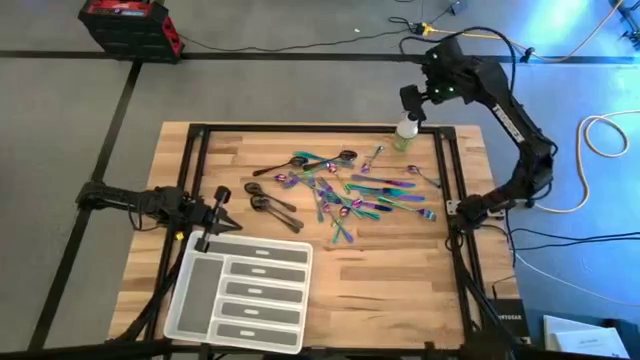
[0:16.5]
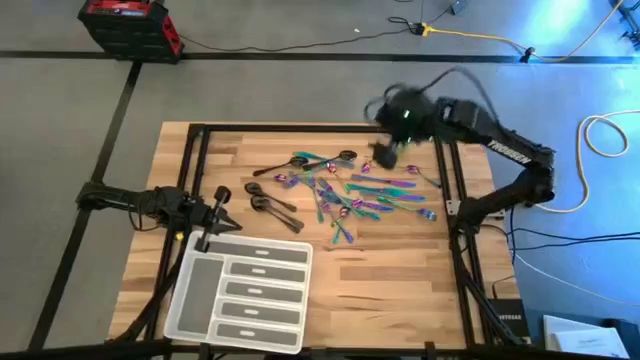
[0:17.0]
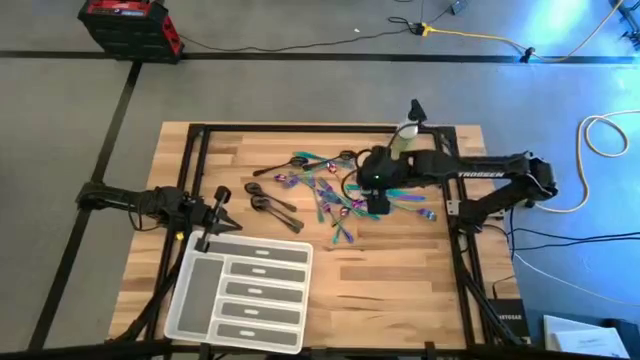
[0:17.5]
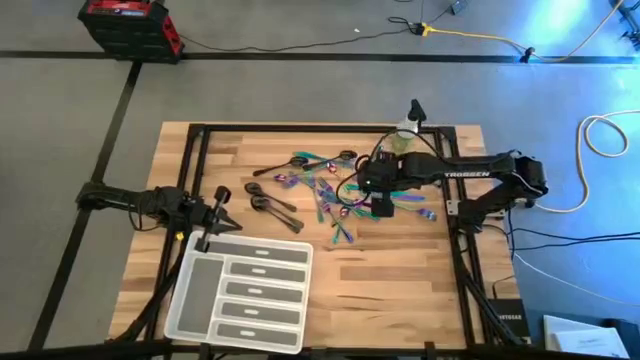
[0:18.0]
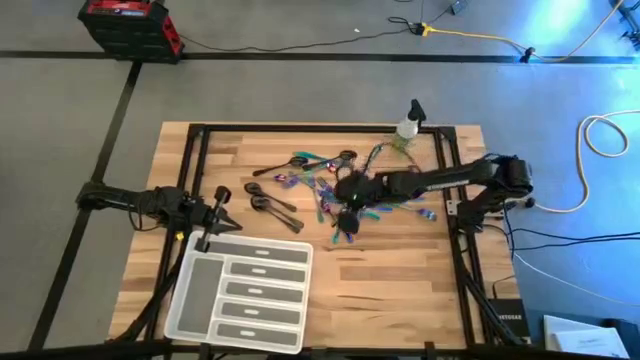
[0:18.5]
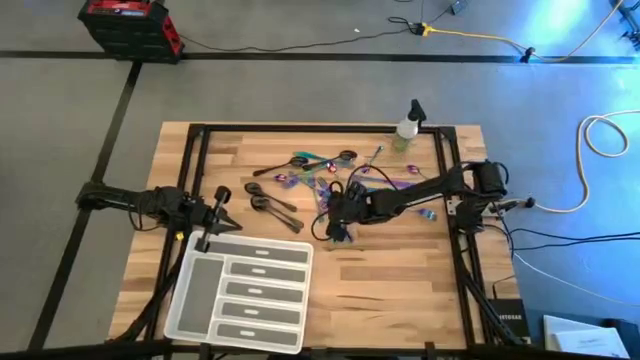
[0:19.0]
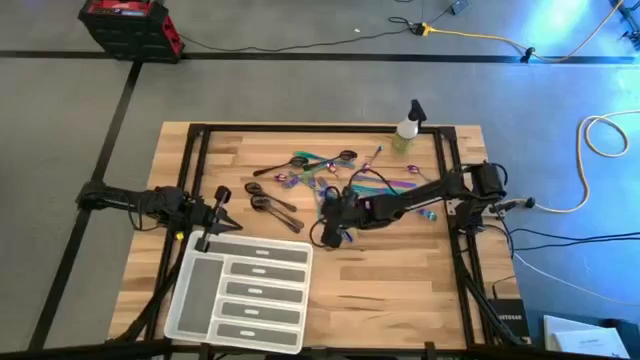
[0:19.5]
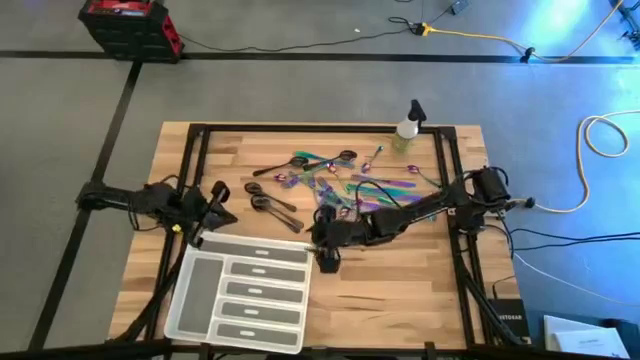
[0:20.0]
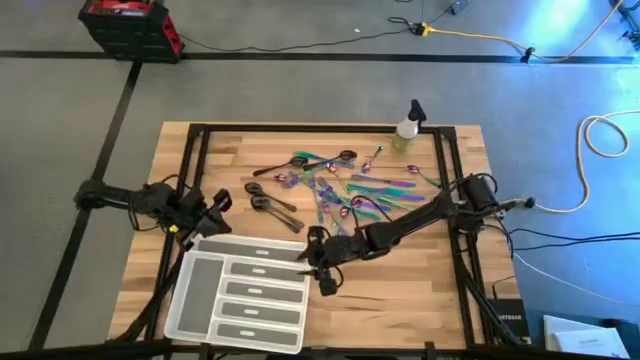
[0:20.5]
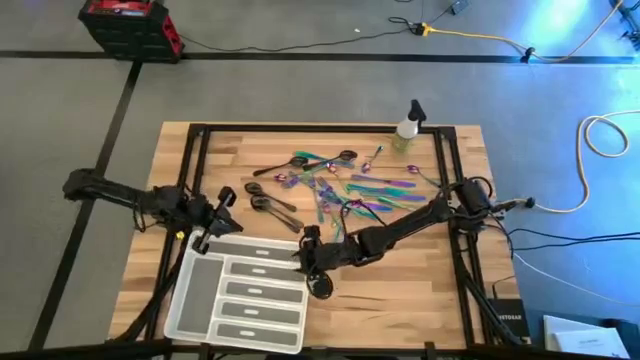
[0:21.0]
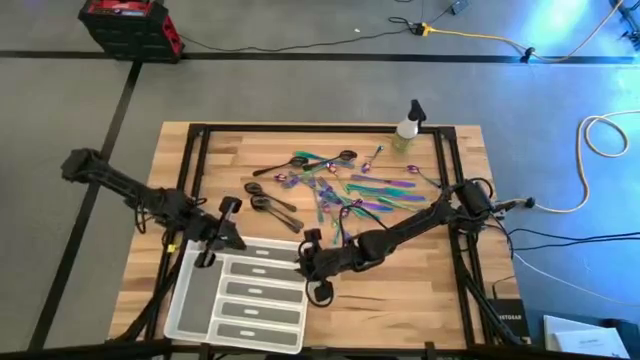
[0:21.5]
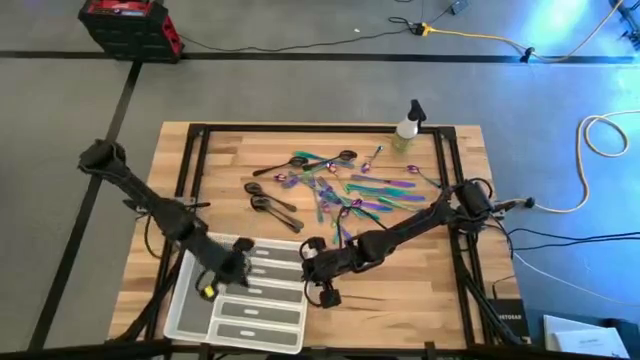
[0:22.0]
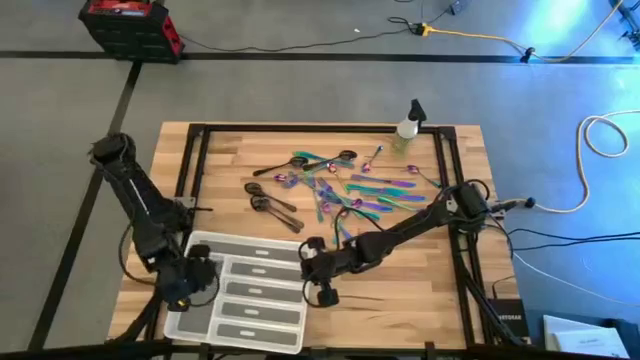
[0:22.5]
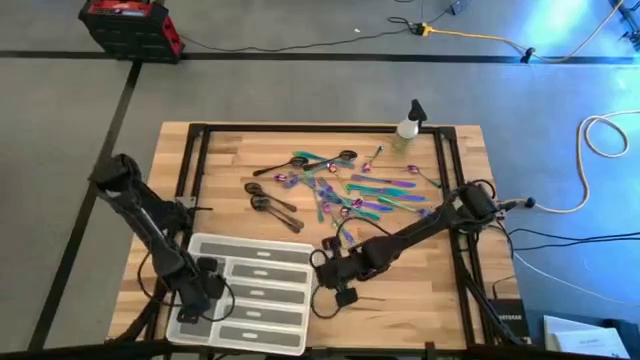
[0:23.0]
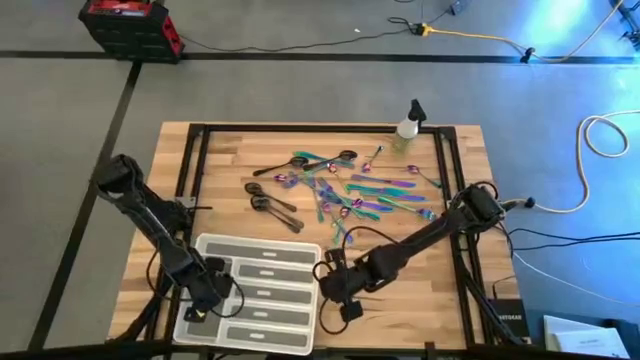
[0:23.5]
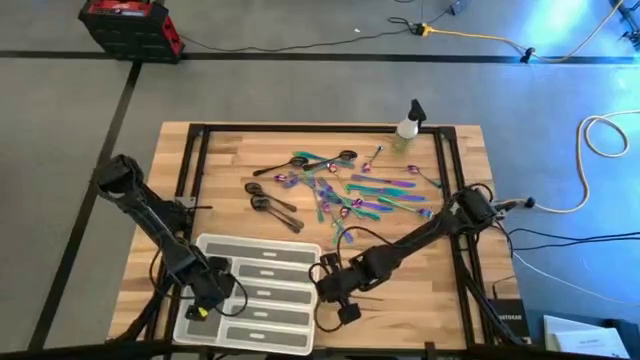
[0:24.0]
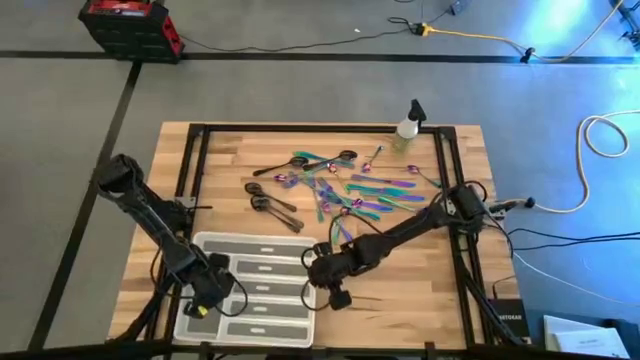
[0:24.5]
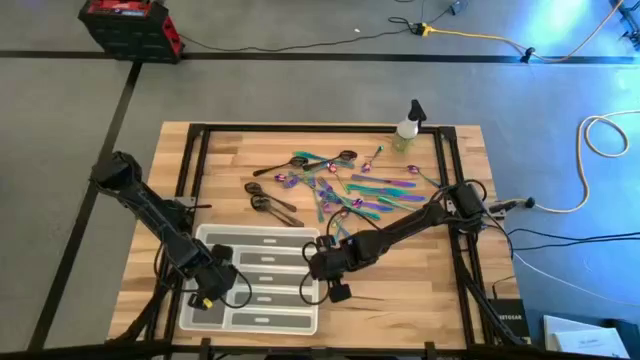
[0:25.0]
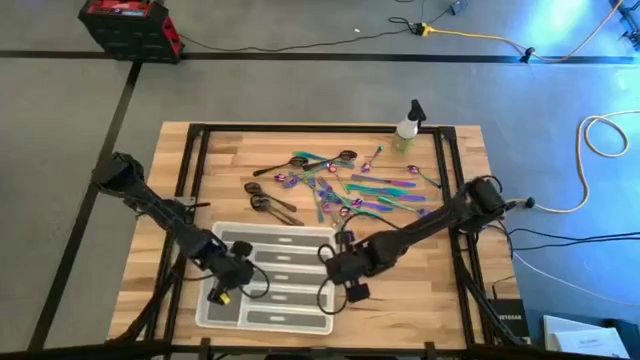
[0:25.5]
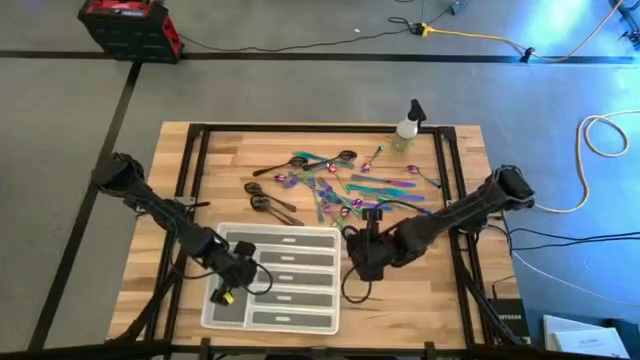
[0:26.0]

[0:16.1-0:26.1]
Task: Sort silverware
Adjust the white silverware tray

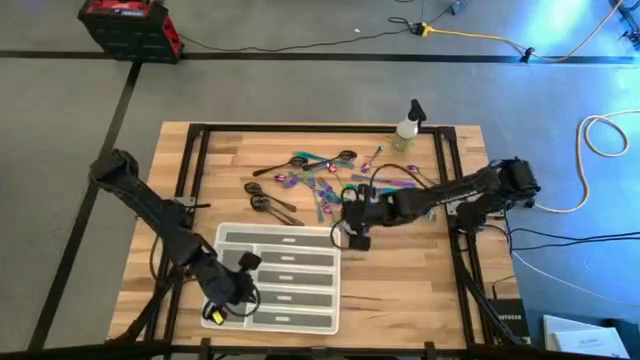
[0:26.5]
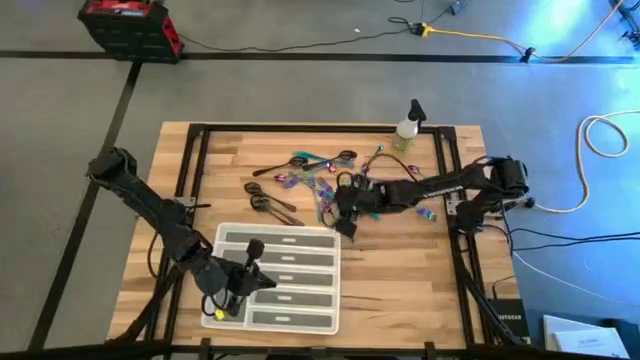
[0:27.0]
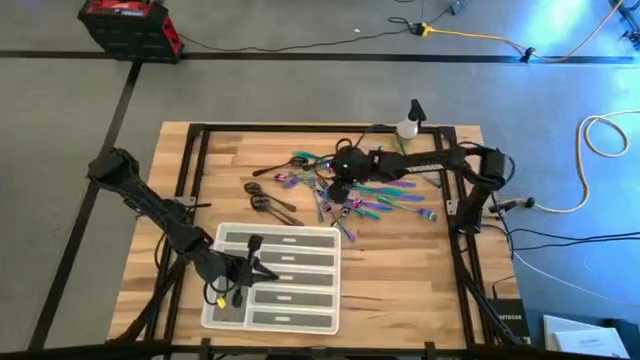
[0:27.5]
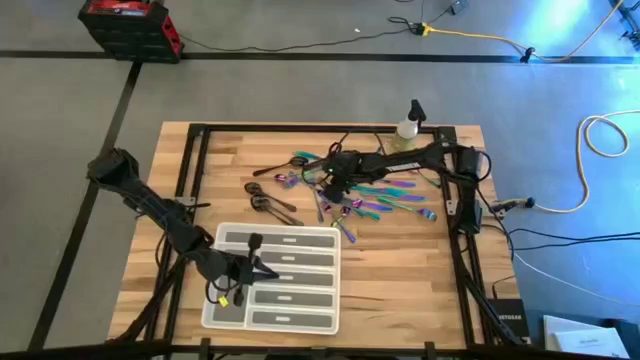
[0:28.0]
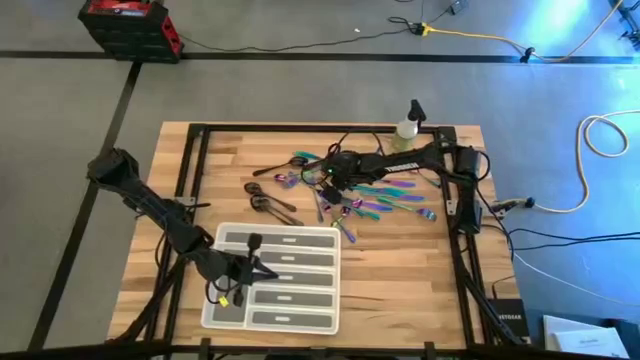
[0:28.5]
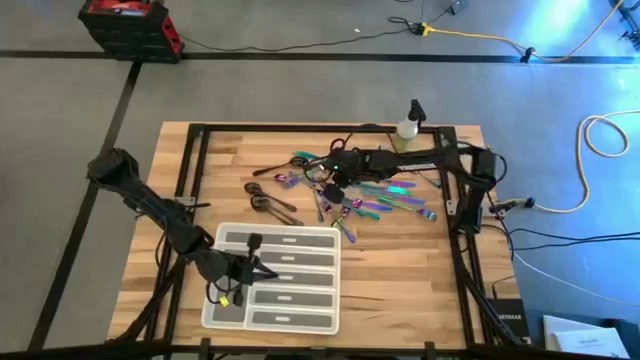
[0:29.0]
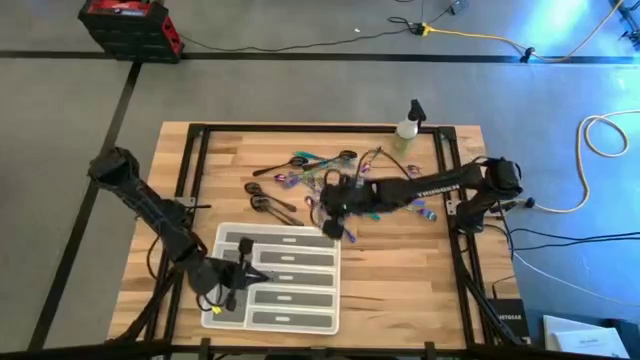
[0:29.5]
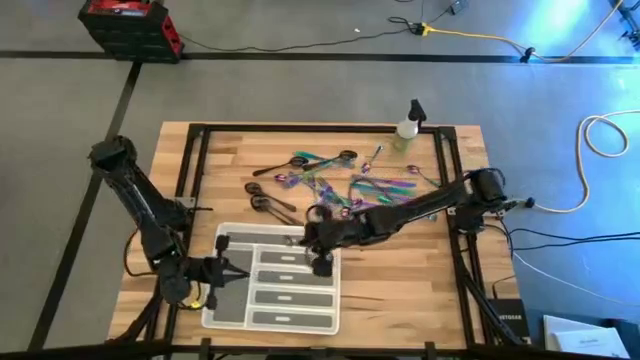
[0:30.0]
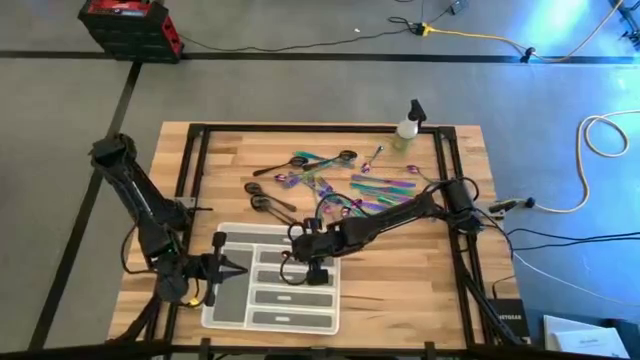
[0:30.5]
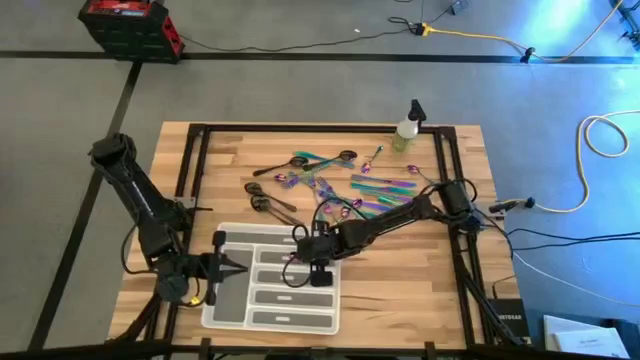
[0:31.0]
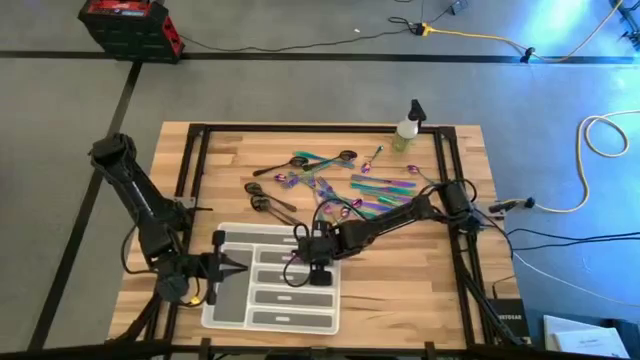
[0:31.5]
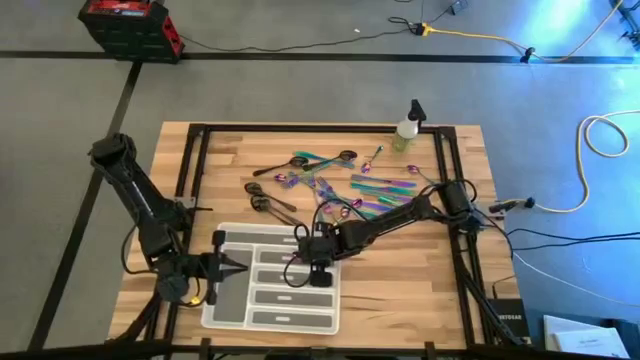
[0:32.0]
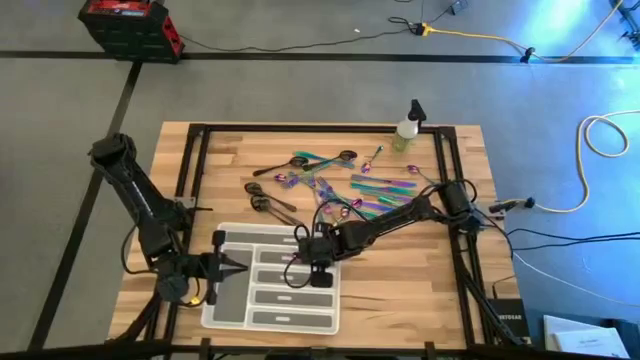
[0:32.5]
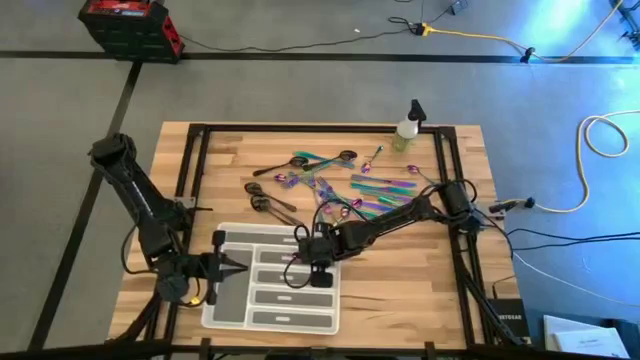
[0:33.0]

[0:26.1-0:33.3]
Put the blue spoon into the white silverware tray

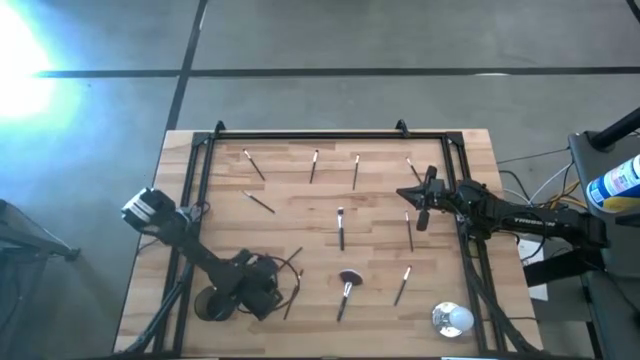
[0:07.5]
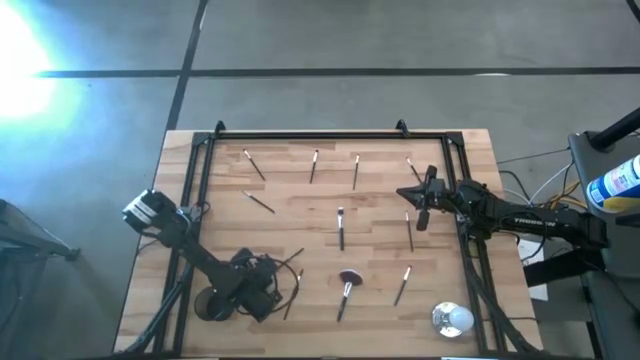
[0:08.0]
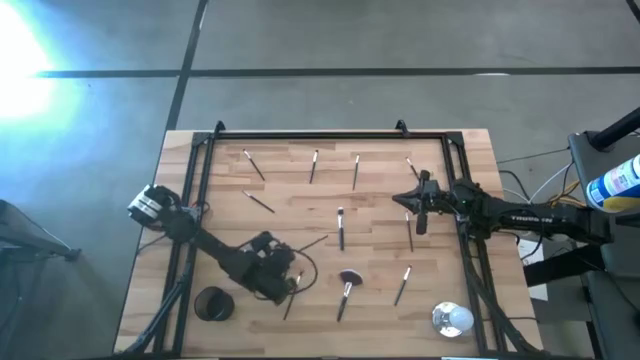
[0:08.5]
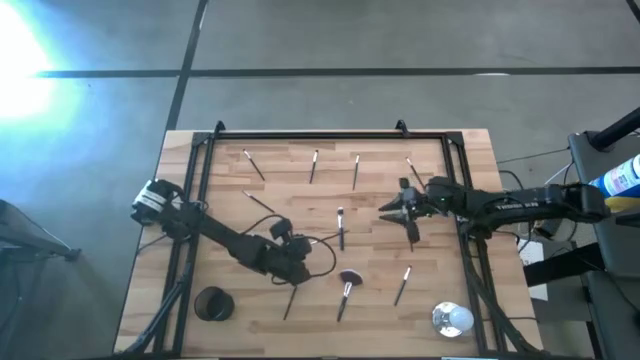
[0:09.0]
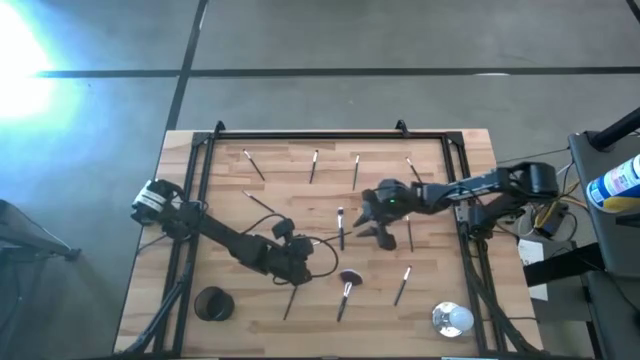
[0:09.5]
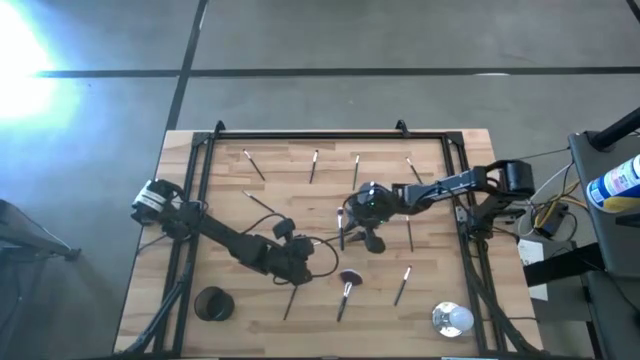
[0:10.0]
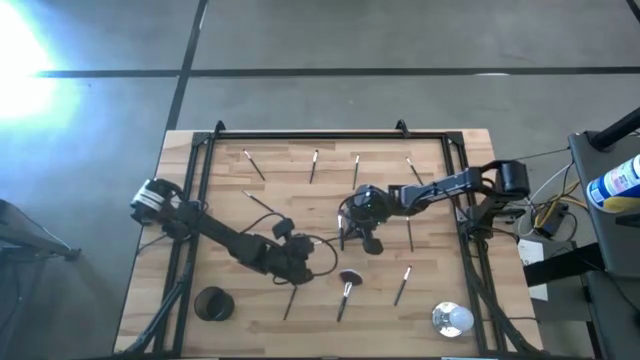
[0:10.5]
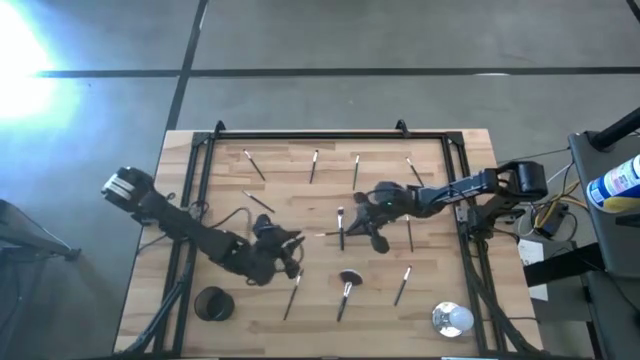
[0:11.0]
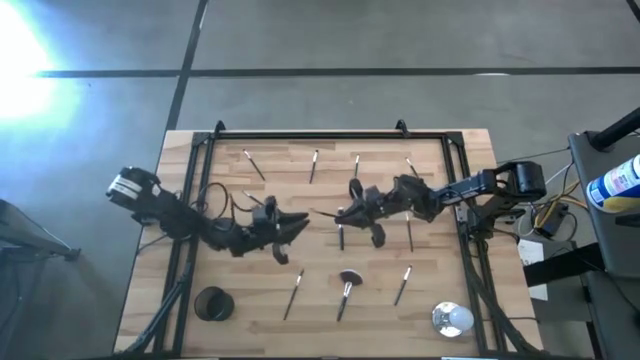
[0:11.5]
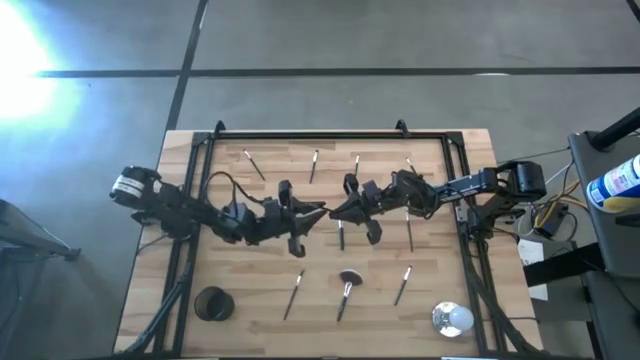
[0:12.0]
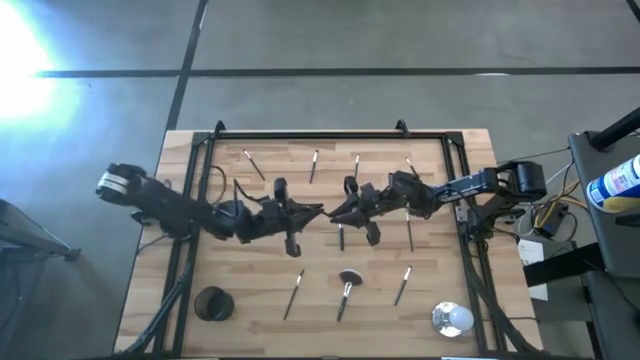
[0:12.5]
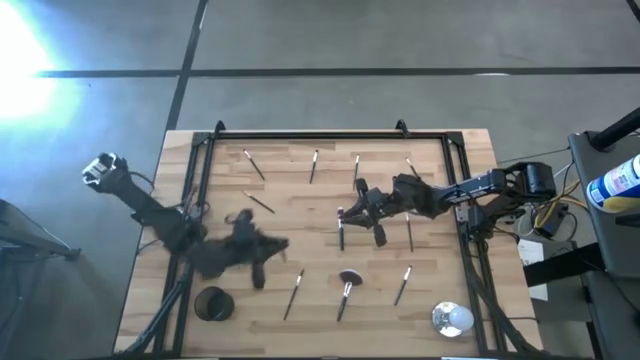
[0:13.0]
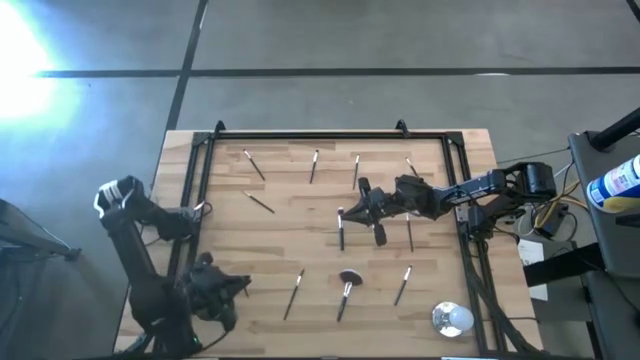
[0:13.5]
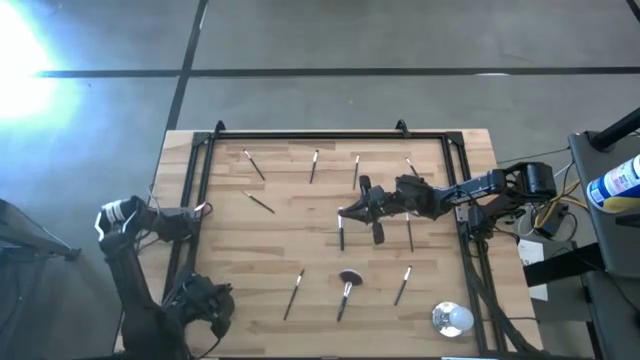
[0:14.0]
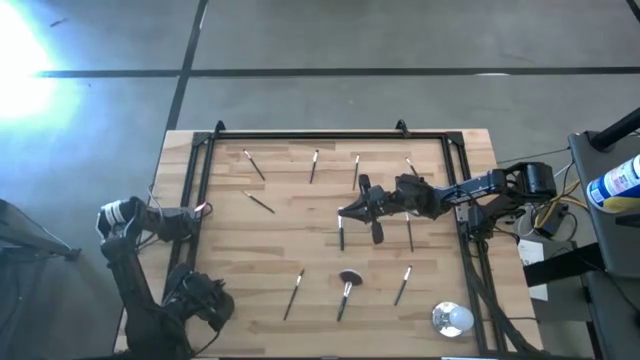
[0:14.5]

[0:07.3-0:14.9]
Task: Pick & Place Makeup Brushes
Put the black liner brush into the makeup holder
